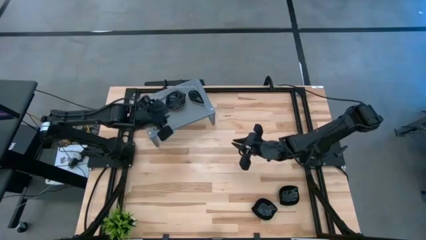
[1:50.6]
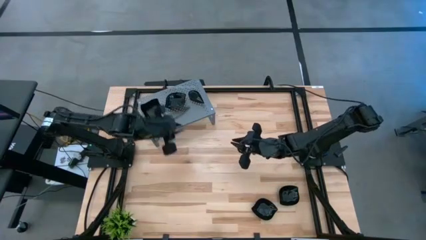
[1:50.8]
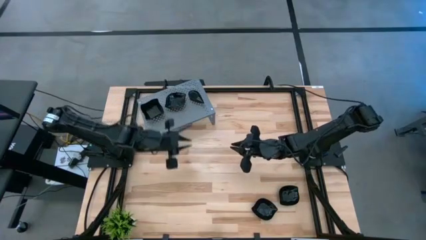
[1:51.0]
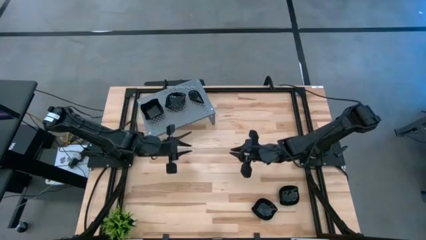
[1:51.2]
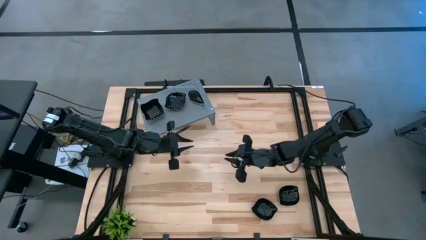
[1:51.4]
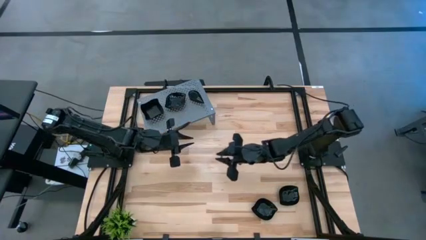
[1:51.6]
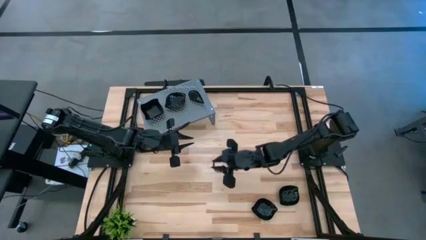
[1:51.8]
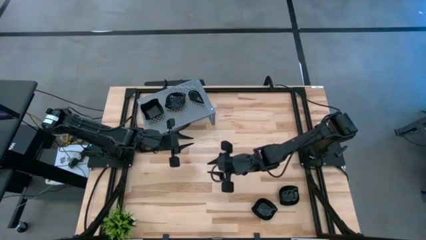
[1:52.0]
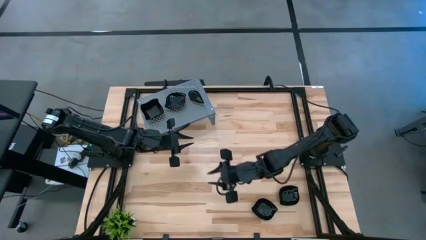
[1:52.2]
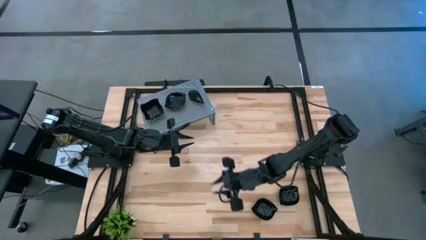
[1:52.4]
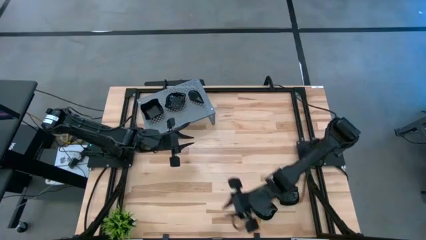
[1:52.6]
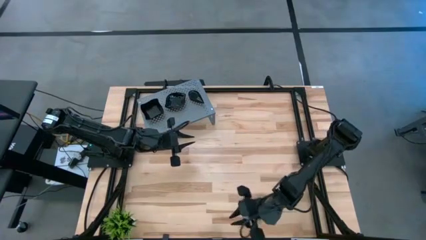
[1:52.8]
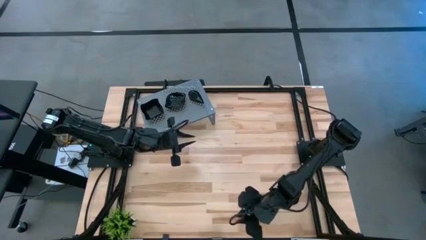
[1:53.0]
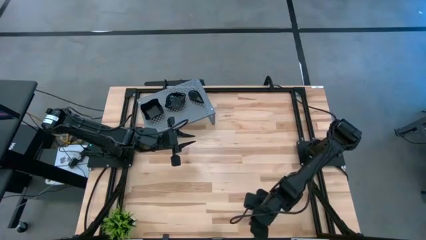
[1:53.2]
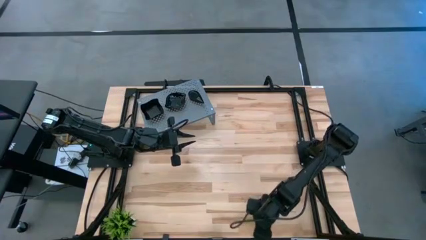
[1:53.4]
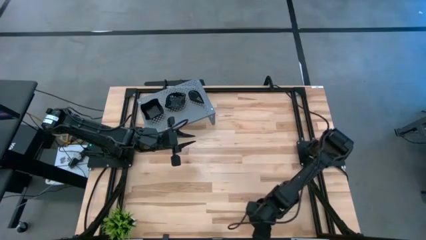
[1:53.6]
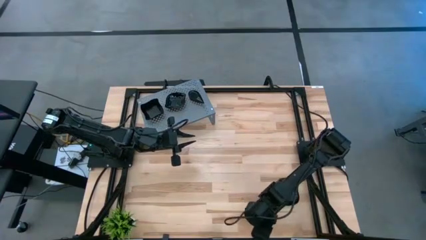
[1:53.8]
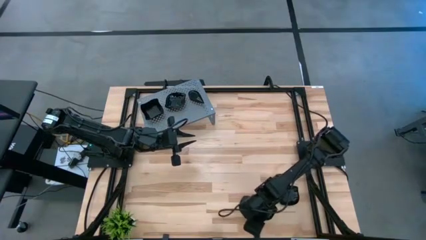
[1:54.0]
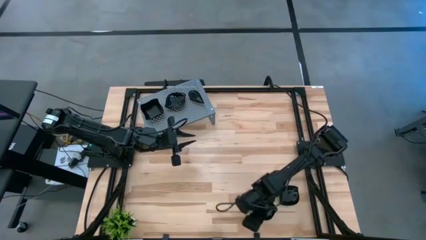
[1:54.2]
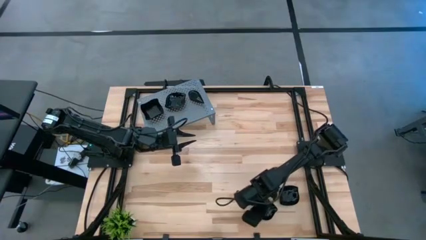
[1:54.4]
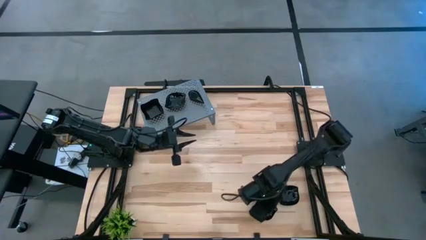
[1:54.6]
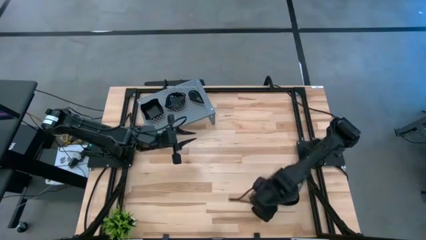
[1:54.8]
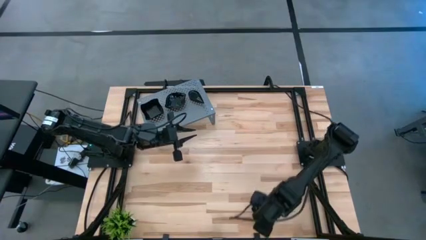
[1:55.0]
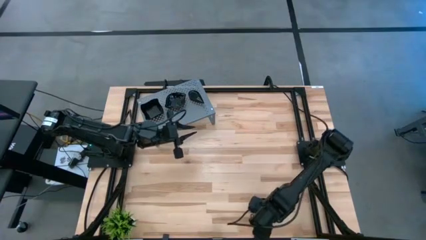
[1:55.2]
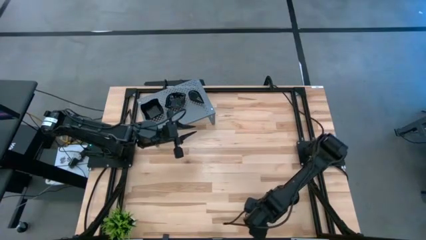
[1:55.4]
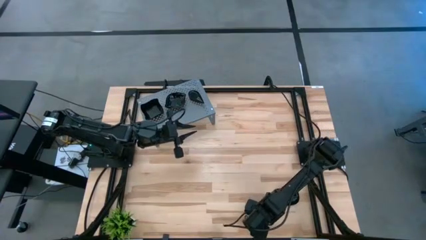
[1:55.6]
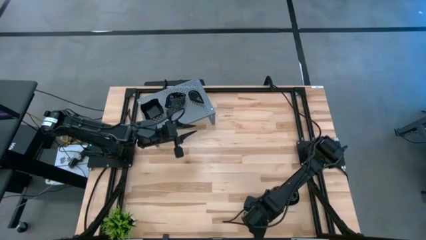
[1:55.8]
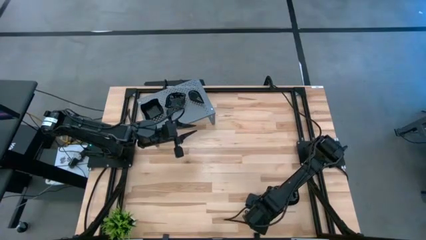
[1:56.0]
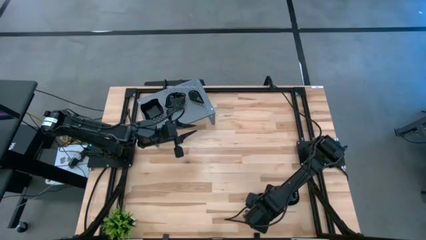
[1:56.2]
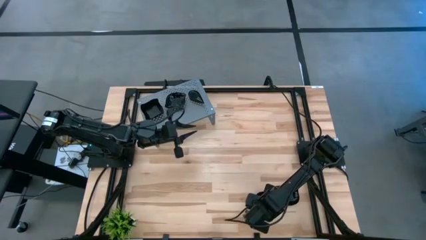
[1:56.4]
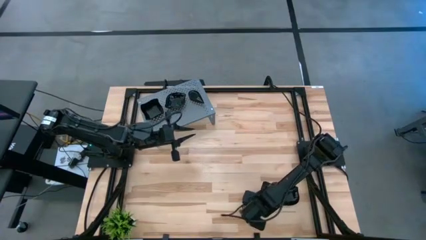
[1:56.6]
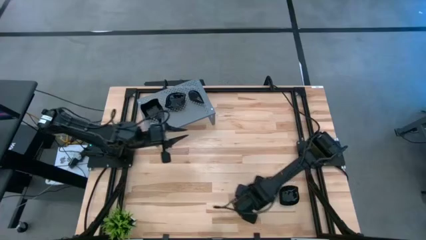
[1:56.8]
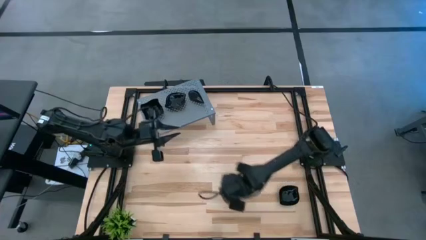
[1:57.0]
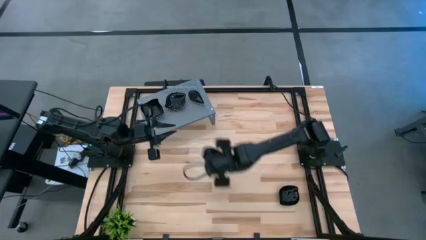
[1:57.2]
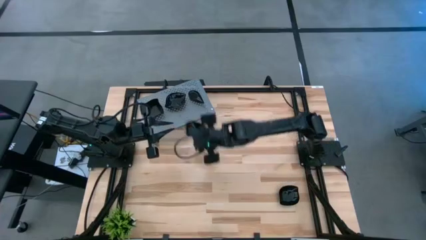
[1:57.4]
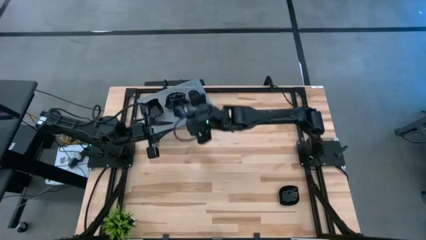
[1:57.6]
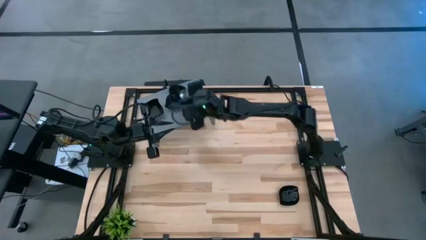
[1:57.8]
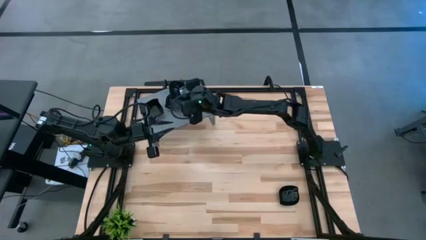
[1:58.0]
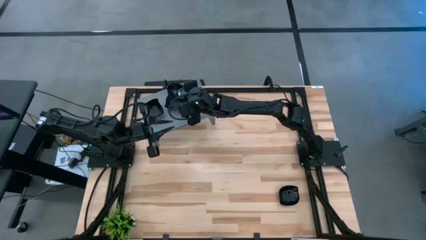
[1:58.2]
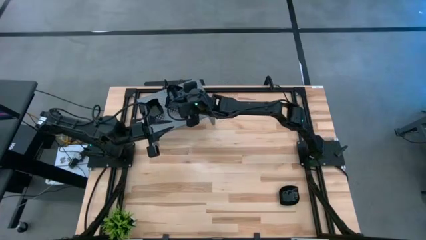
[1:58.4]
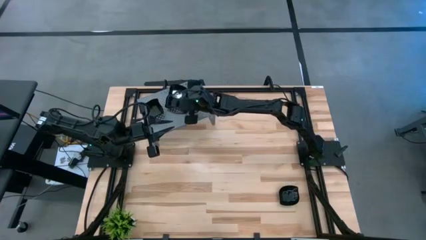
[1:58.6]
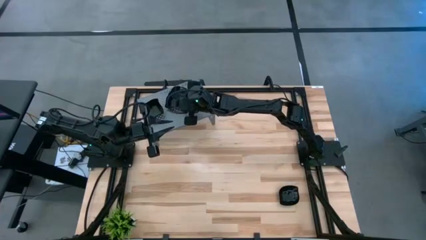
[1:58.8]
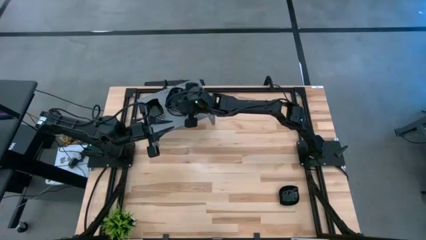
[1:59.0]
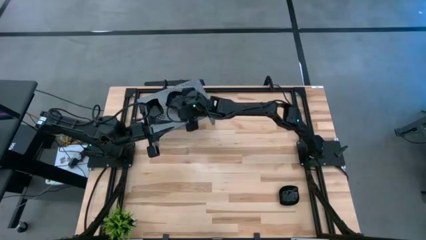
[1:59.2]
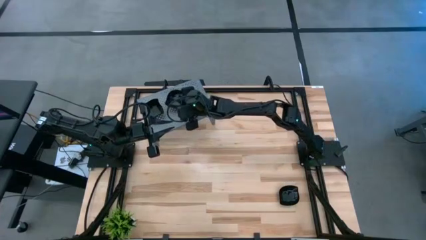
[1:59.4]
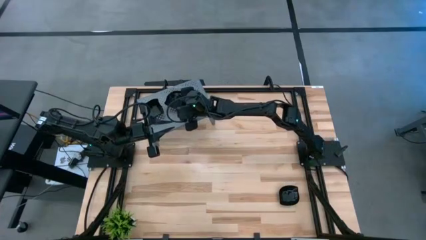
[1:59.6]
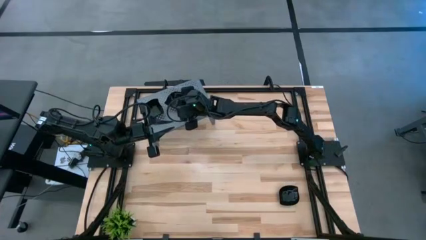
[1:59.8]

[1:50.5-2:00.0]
Task: Pick & Place Mini shaped plates
Stack the black leaf shaped plate on top of the black leaf shaped plate on the shelf

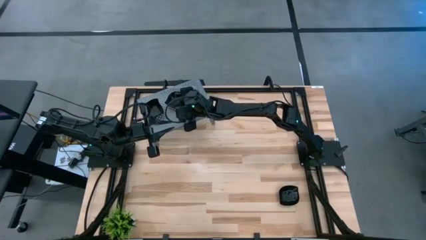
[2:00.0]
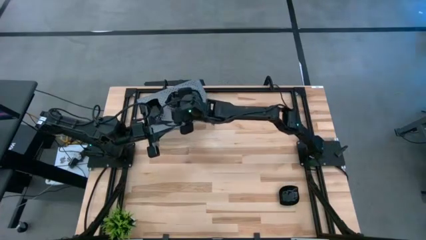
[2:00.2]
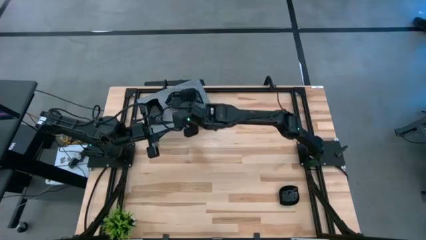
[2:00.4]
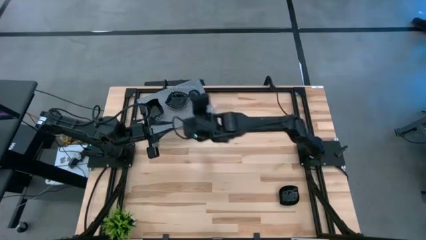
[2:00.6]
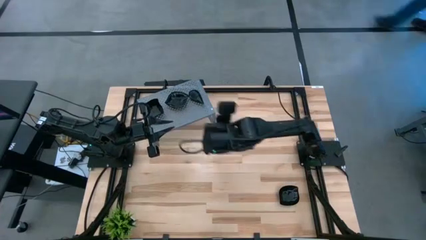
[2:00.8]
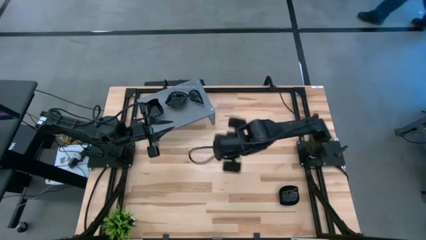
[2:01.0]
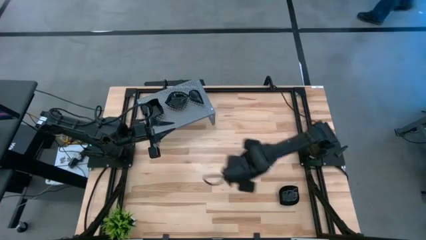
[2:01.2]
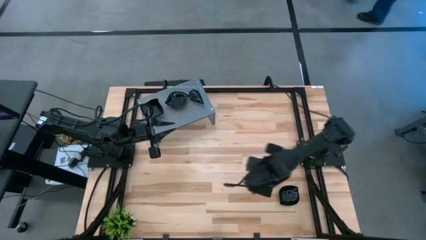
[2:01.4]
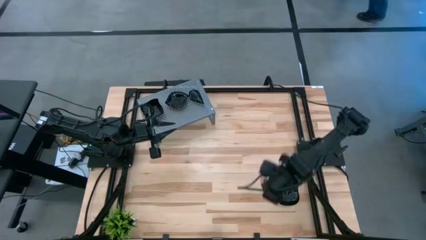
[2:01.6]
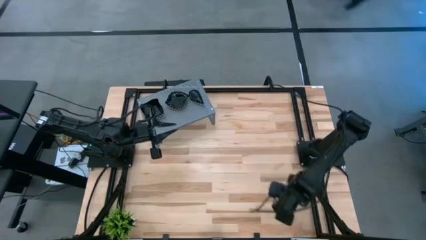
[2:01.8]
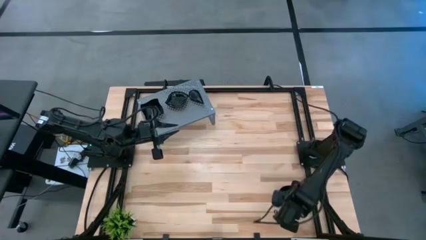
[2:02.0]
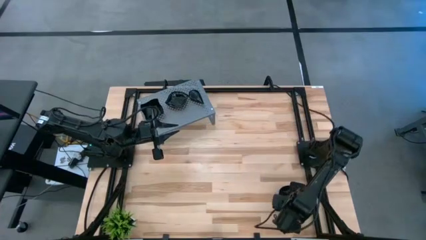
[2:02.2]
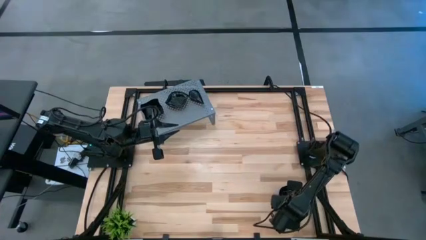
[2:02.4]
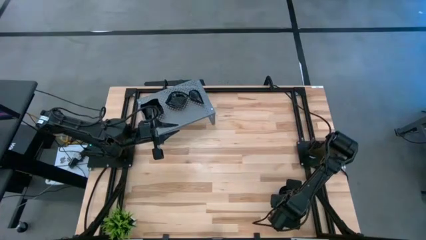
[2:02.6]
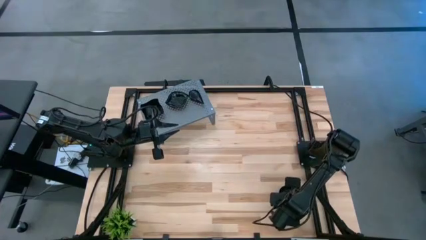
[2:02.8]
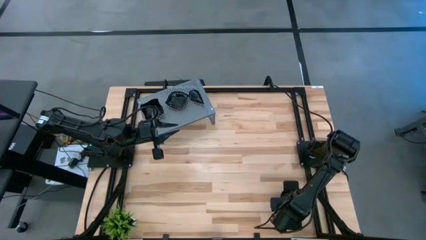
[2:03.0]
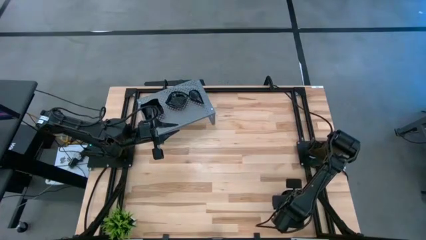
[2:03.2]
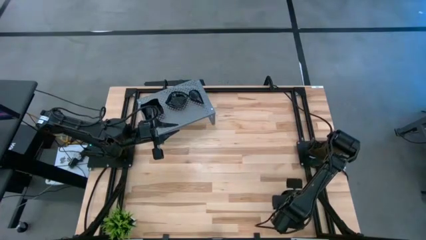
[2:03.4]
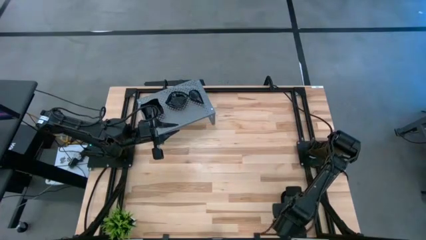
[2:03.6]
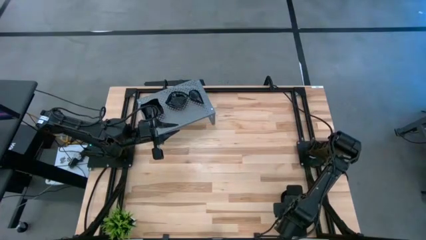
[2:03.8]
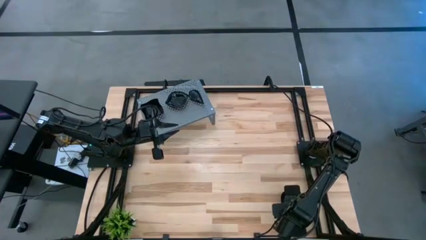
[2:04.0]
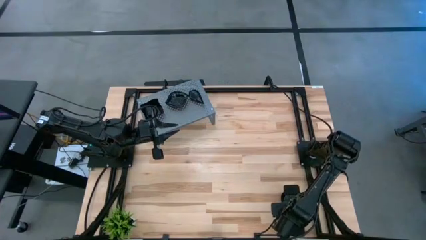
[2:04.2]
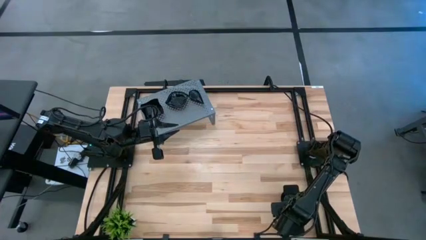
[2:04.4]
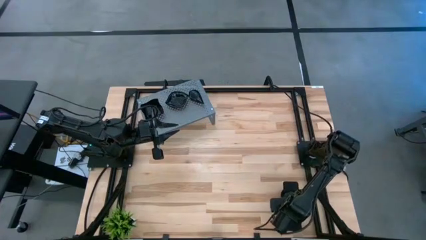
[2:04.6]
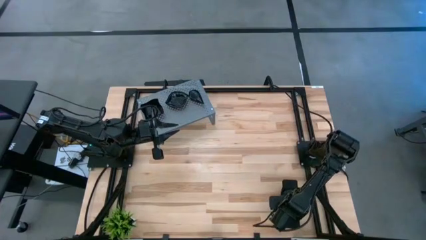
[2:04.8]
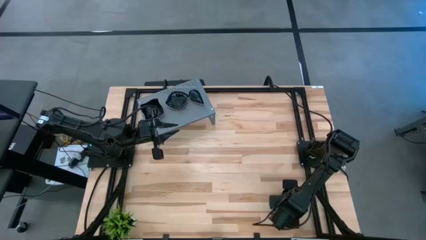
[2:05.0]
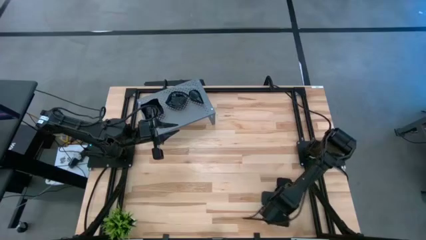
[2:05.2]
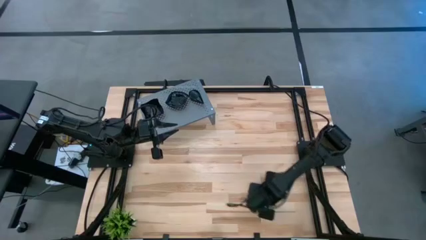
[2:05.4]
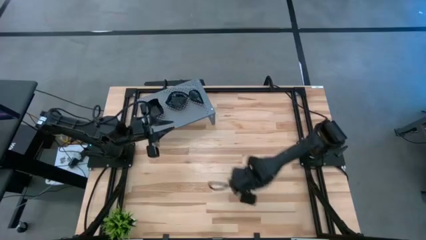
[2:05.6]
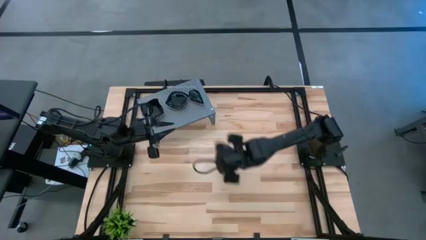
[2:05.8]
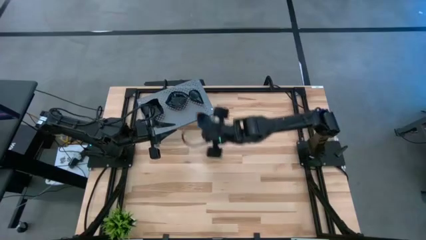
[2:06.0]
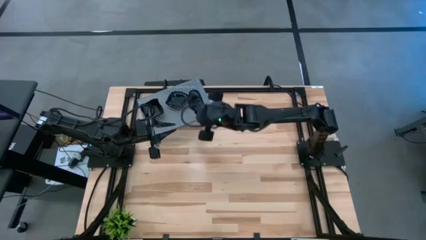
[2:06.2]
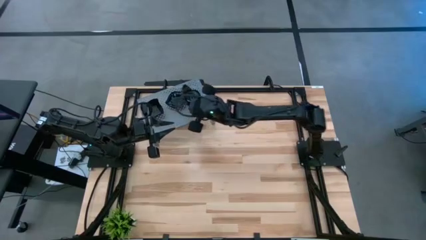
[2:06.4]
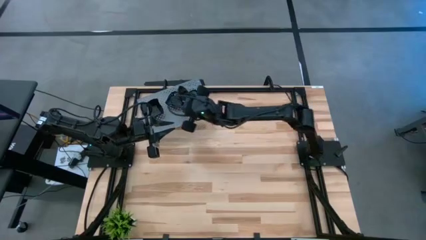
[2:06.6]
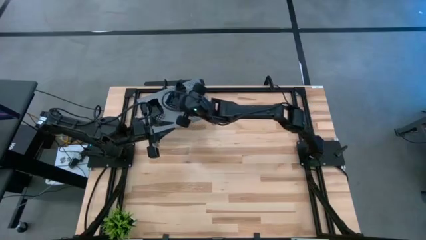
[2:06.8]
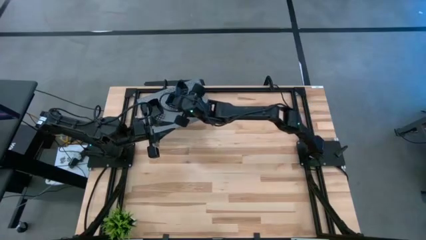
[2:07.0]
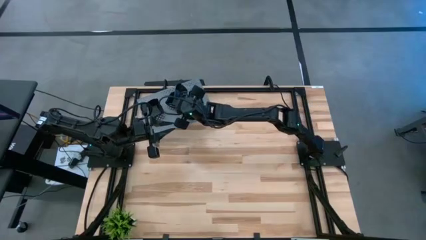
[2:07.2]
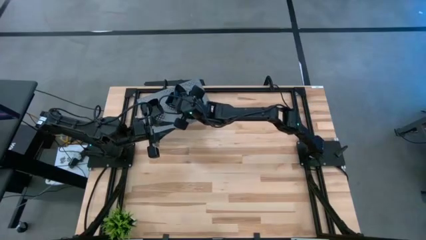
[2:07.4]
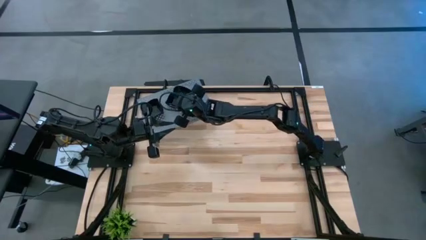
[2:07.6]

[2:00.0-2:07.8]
Stack the black leaf shaped plate on top of the black leaf shaped plate on the shelf
